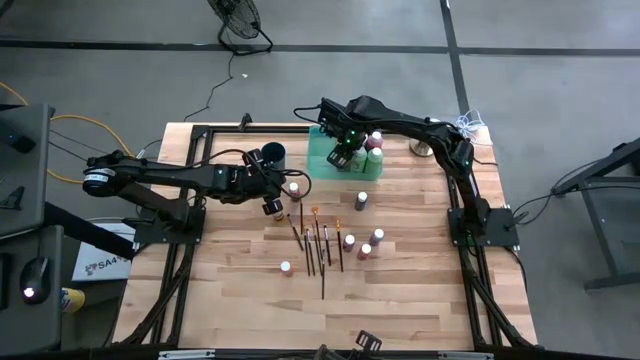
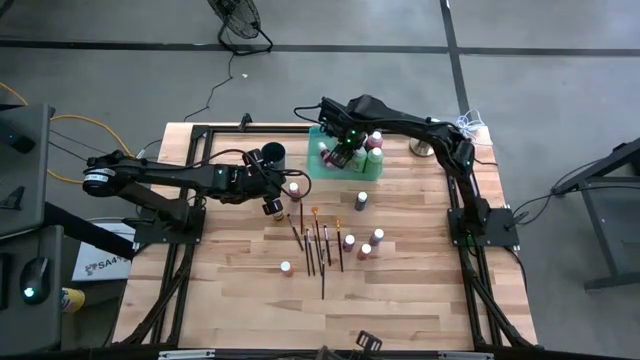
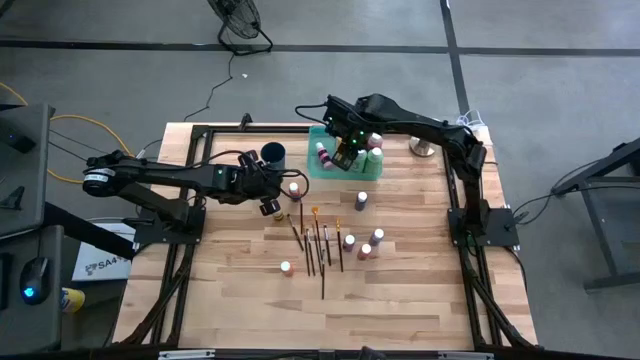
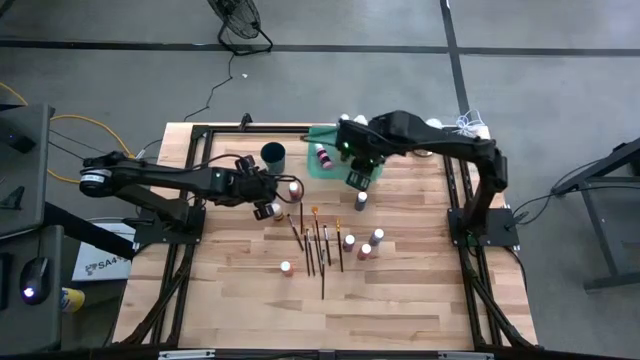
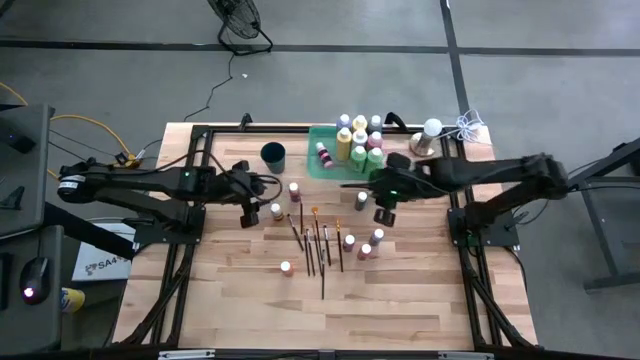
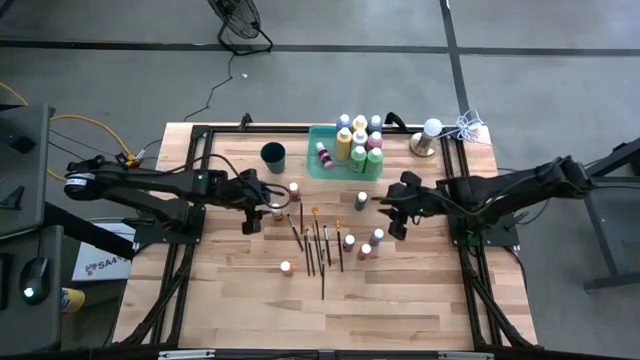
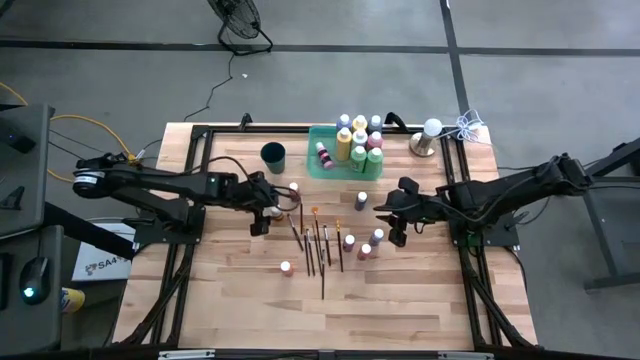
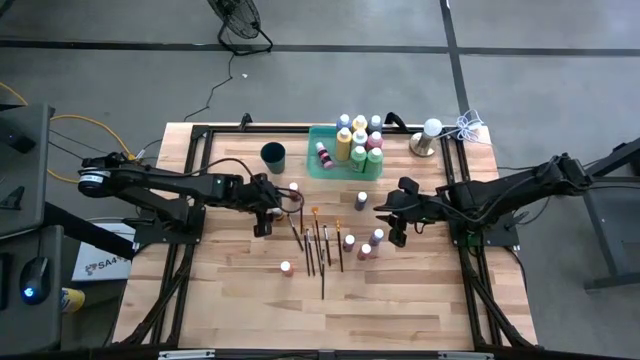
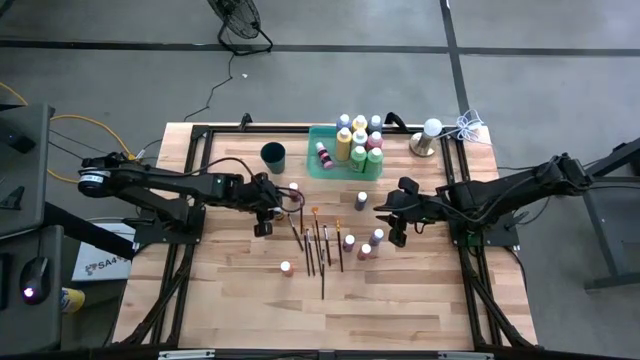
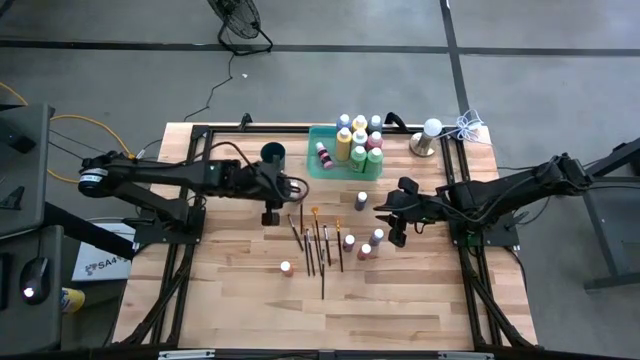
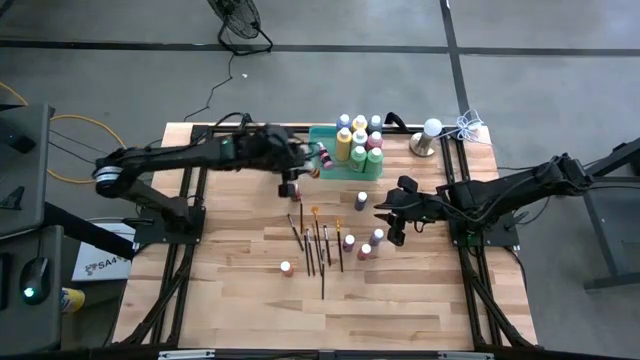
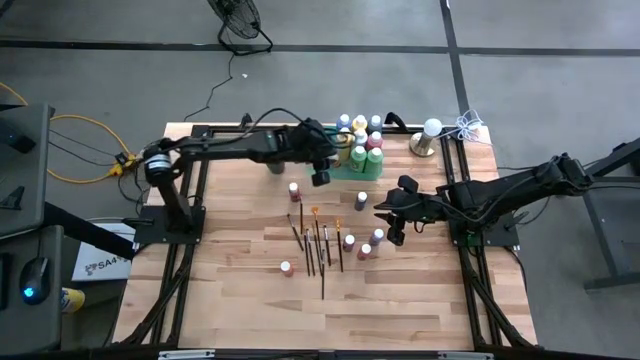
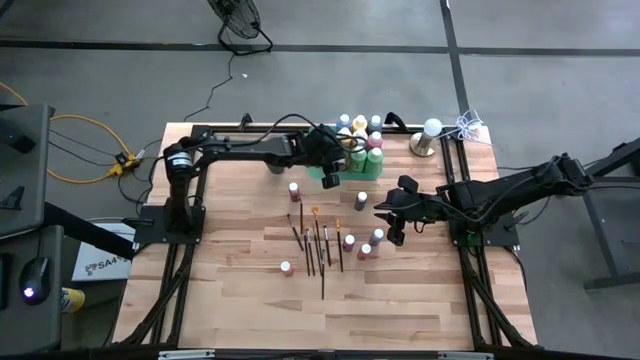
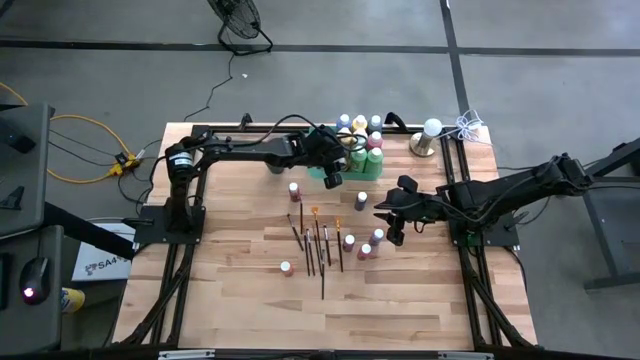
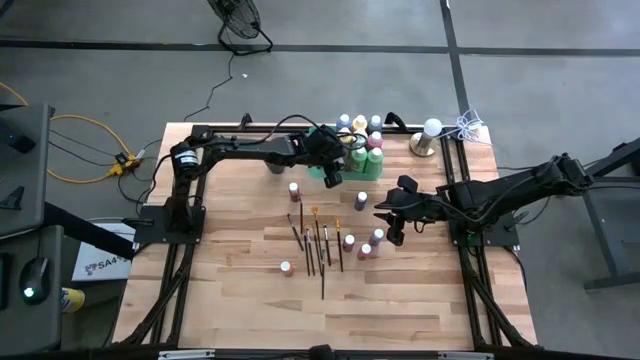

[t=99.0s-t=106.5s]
Task: Pick & Place Paint Supplies
Put the small yellow paint bottle into the green bin

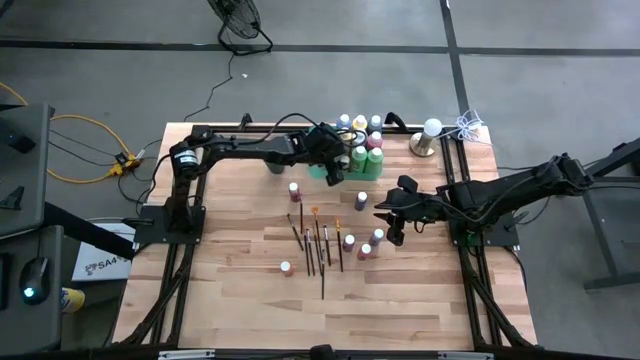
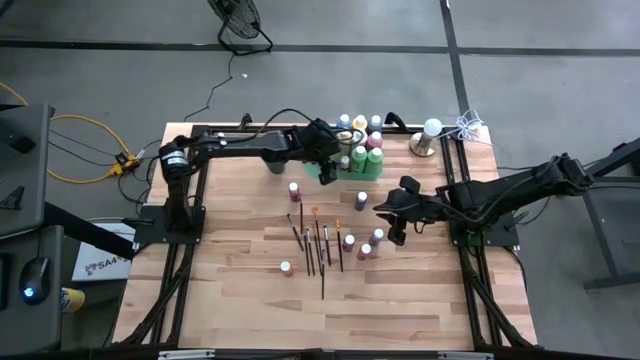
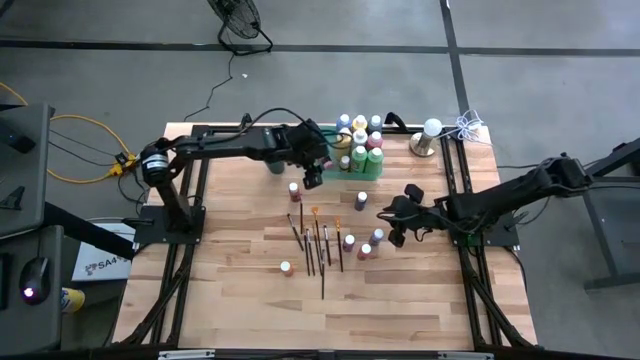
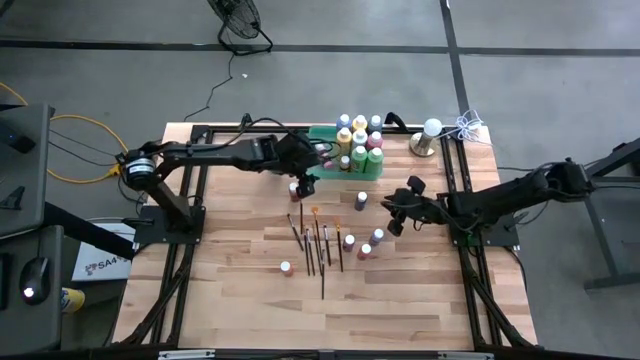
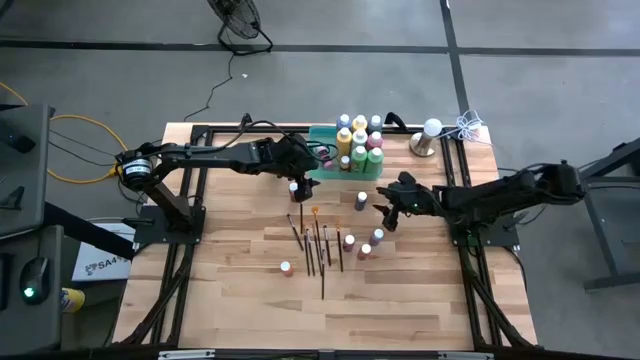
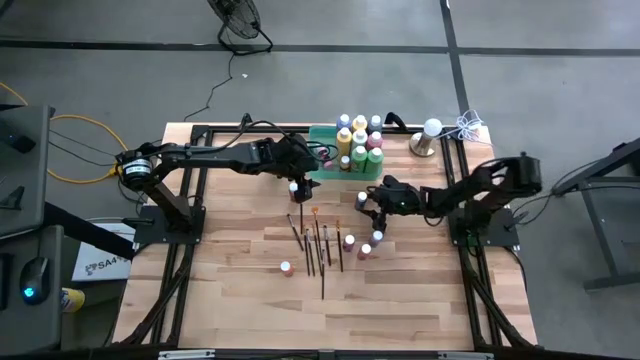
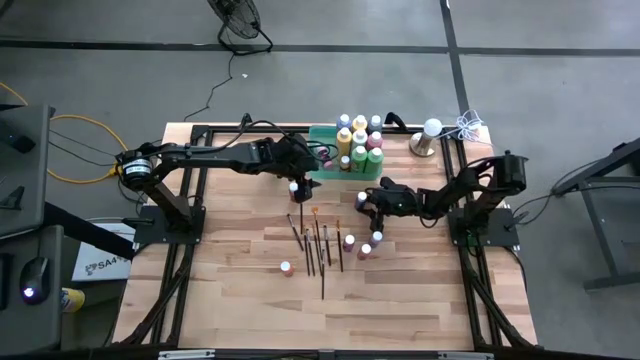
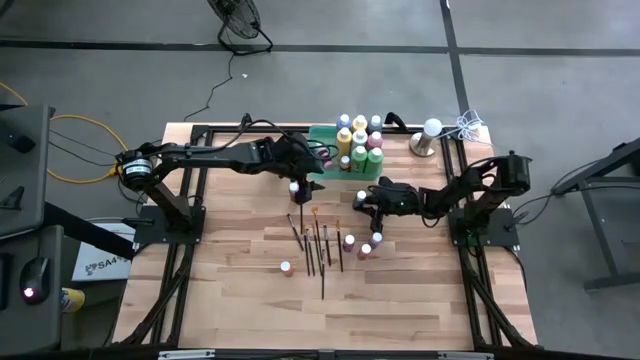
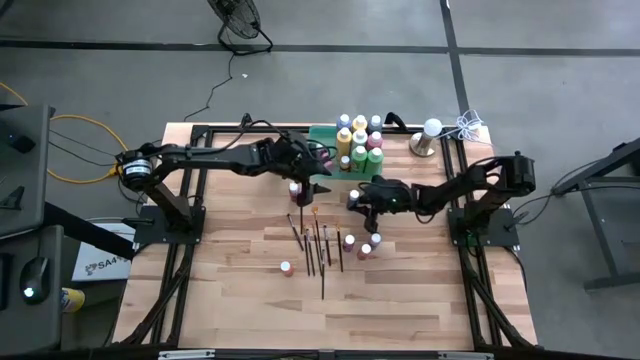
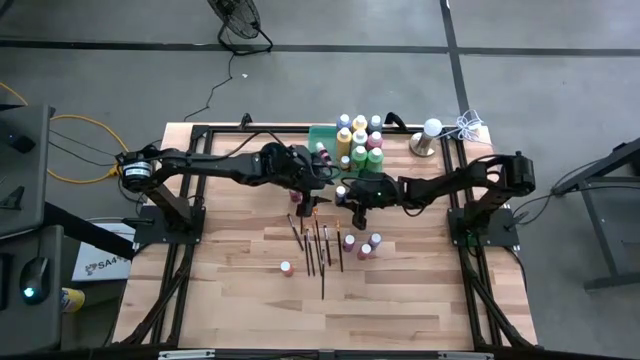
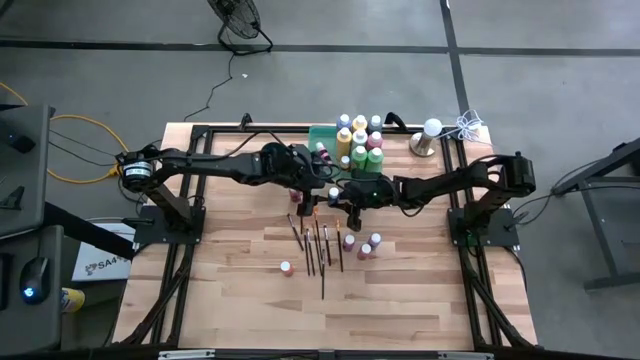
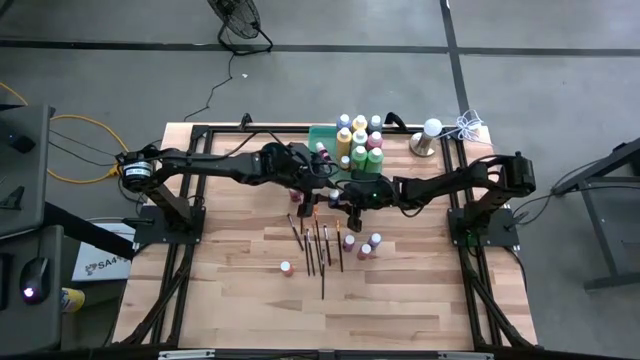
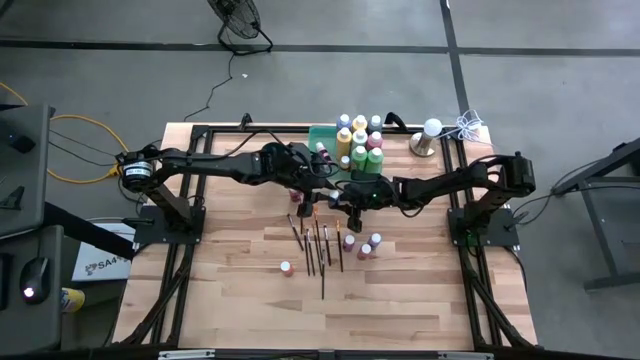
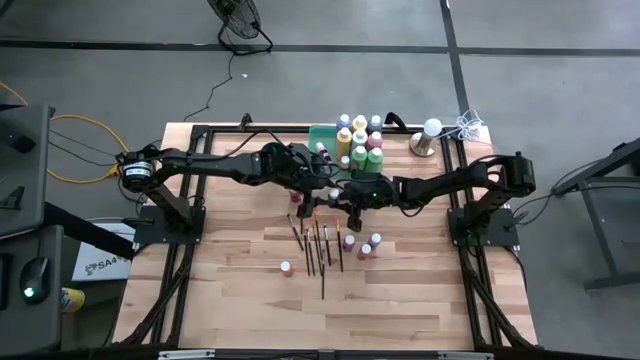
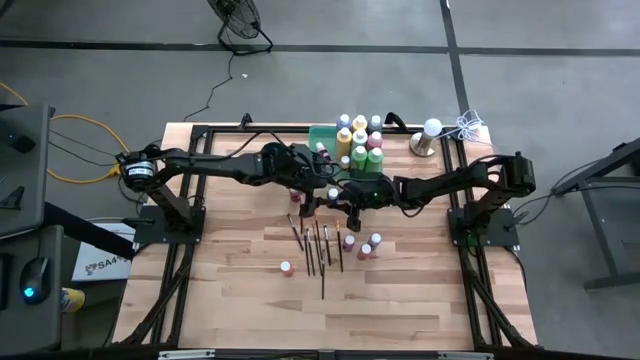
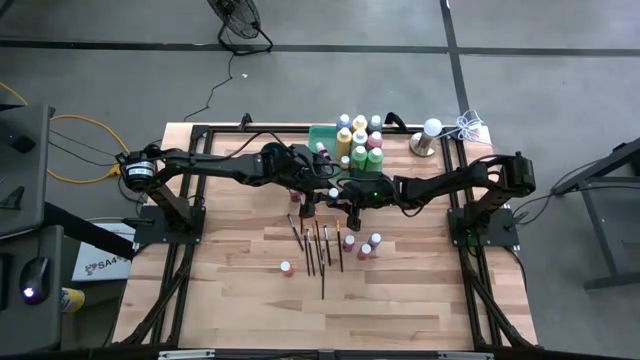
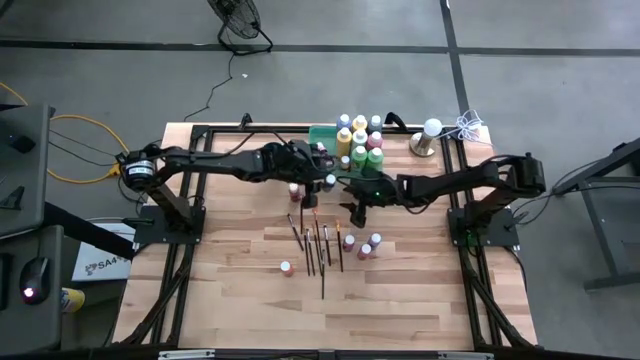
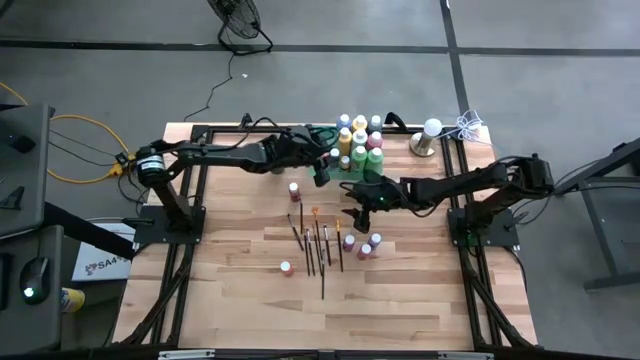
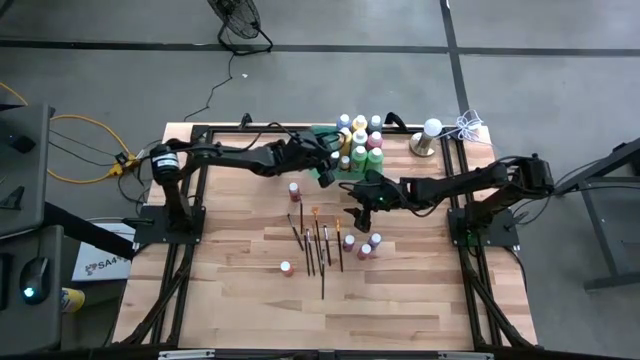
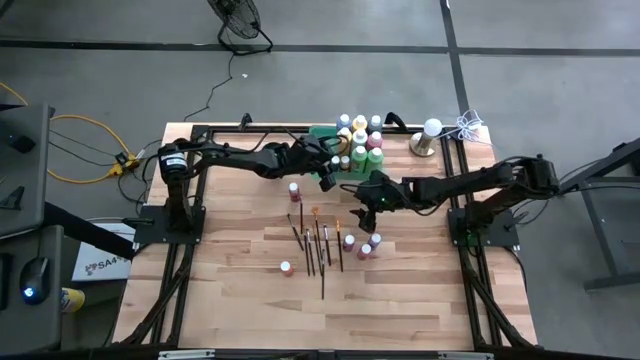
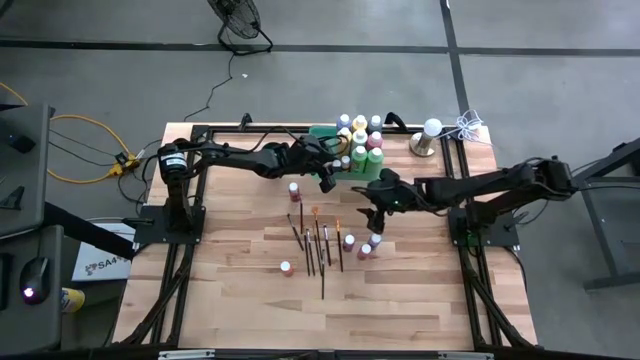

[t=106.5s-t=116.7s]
Put the small blue paint bottle into the green bin

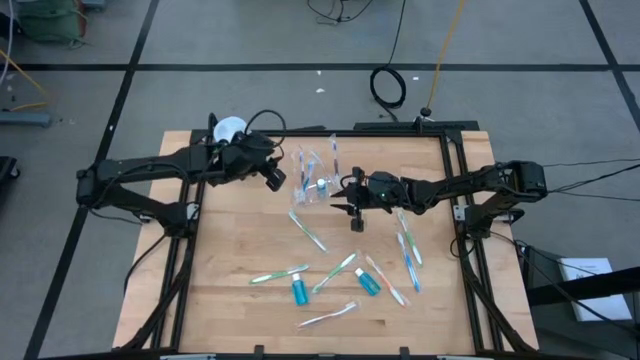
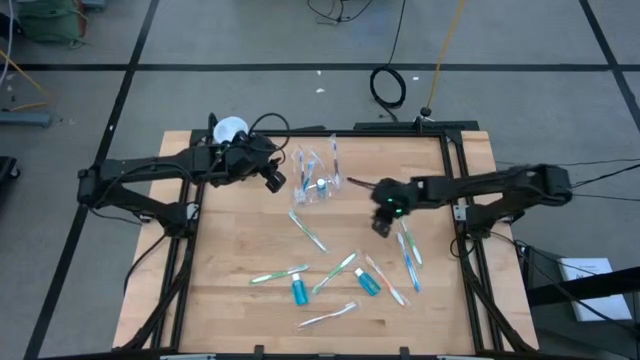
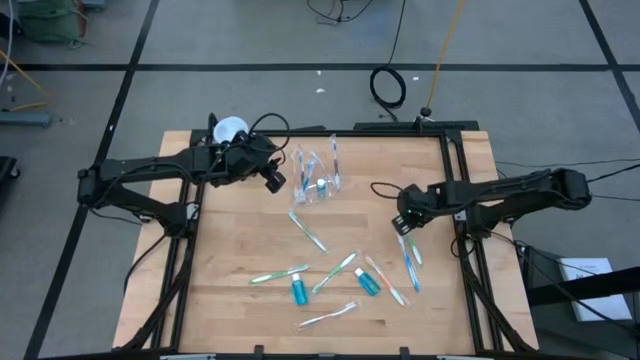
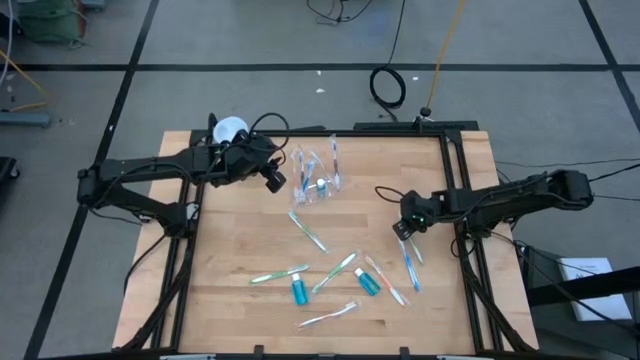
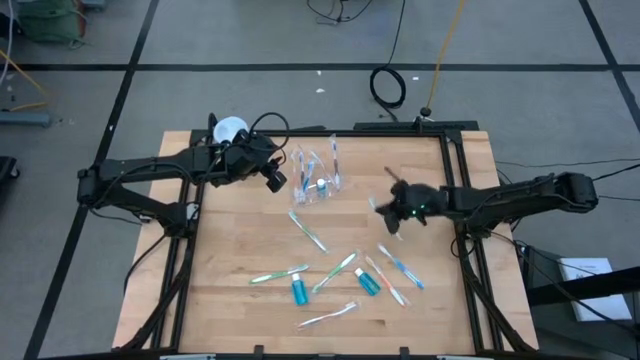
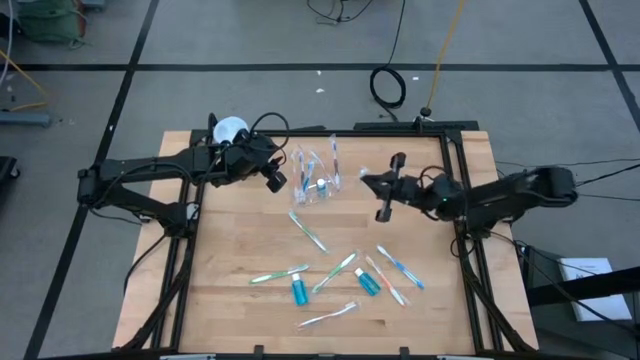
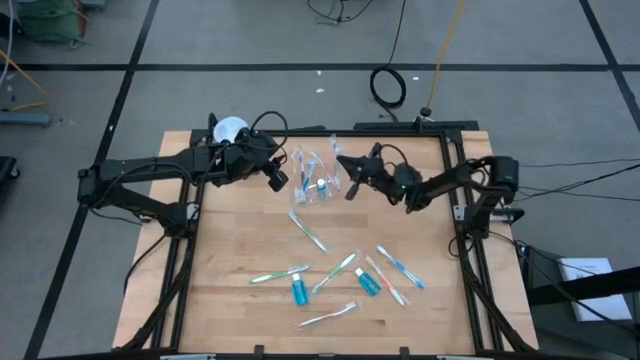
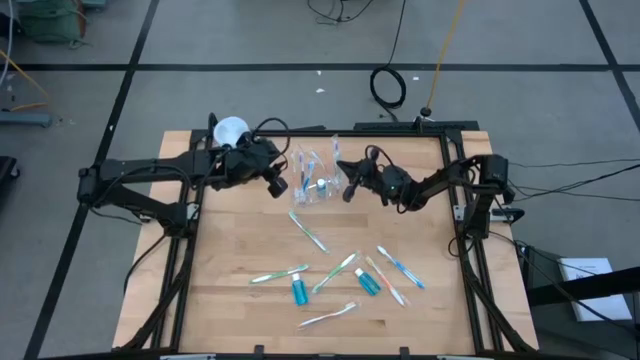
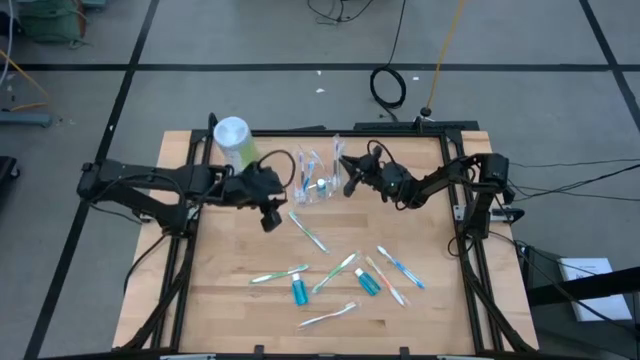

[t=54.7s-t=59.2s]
Task: Pick & Place toothbrushing station
Put the green toothbrush into the transparent organizer
